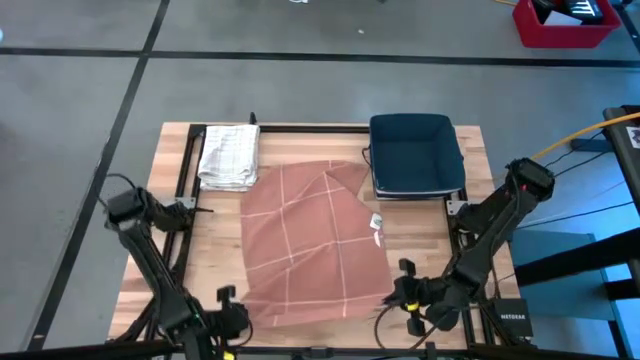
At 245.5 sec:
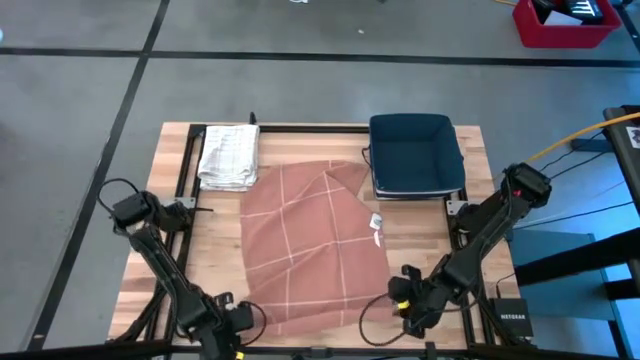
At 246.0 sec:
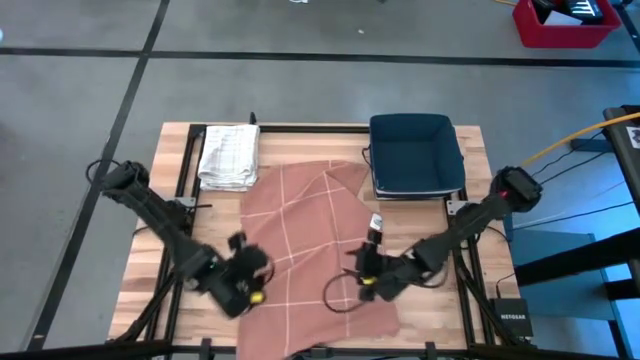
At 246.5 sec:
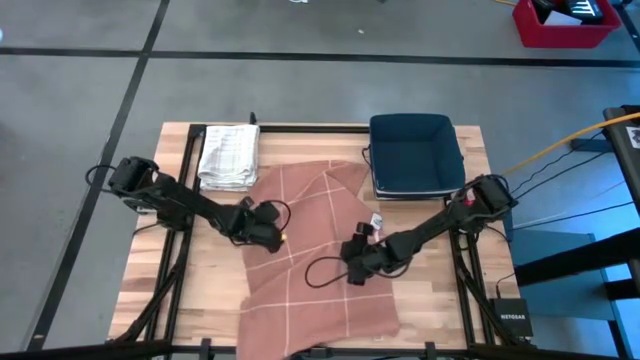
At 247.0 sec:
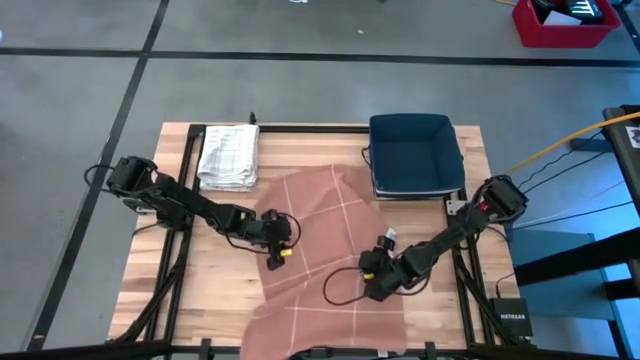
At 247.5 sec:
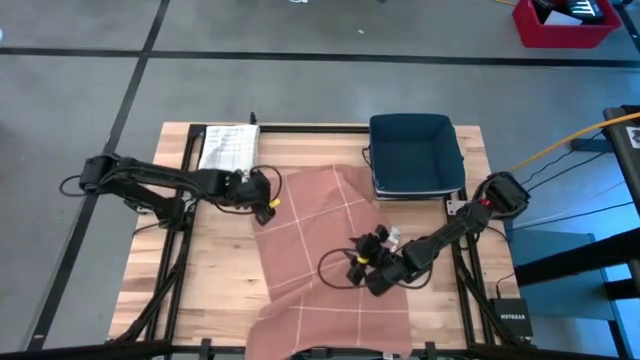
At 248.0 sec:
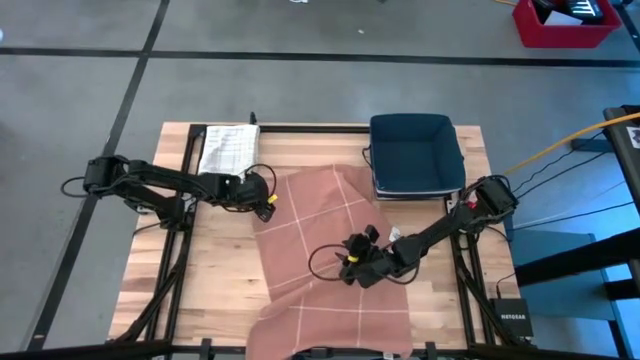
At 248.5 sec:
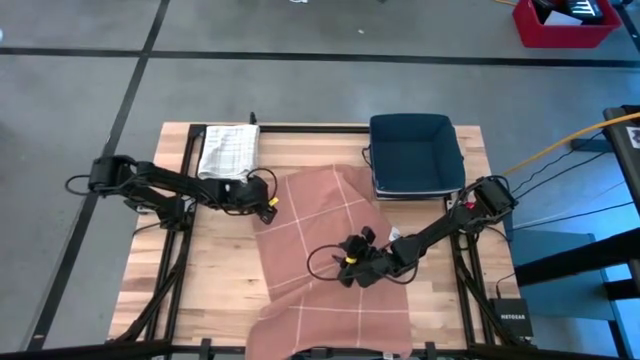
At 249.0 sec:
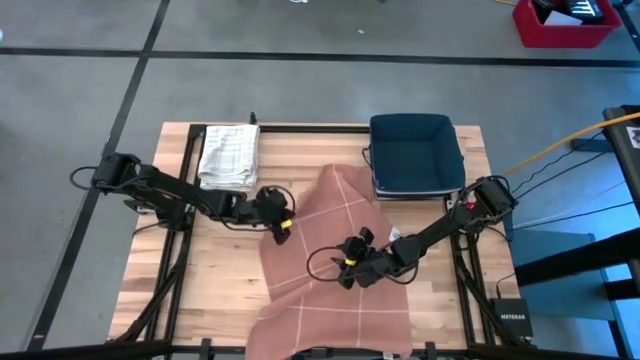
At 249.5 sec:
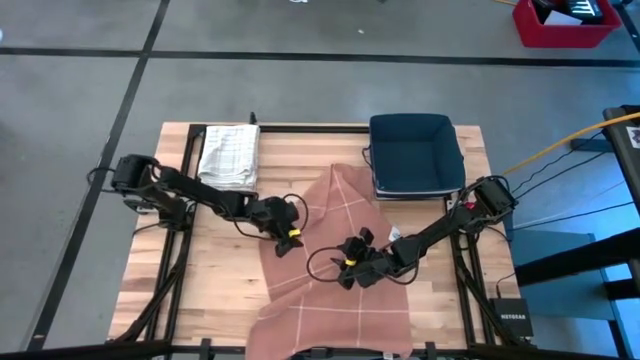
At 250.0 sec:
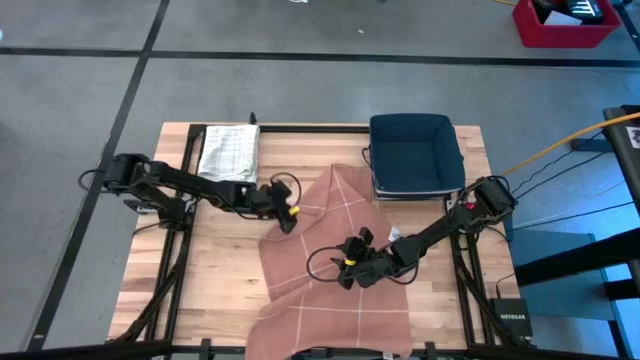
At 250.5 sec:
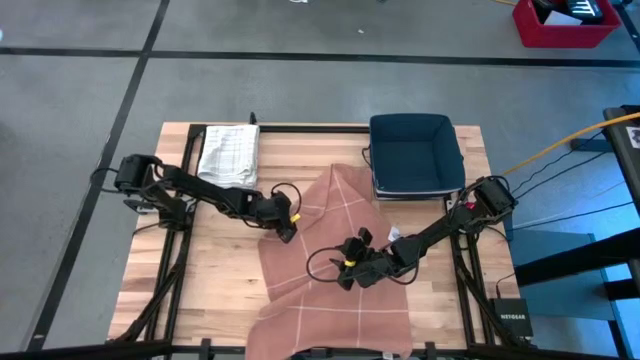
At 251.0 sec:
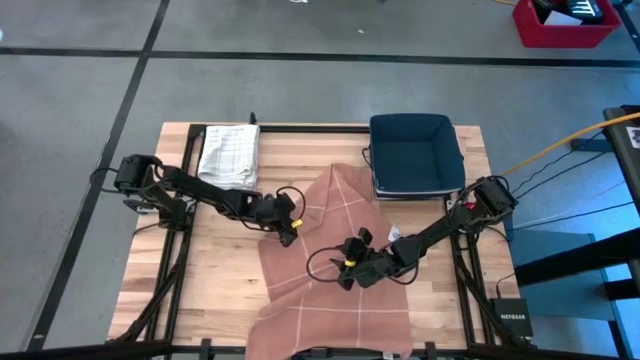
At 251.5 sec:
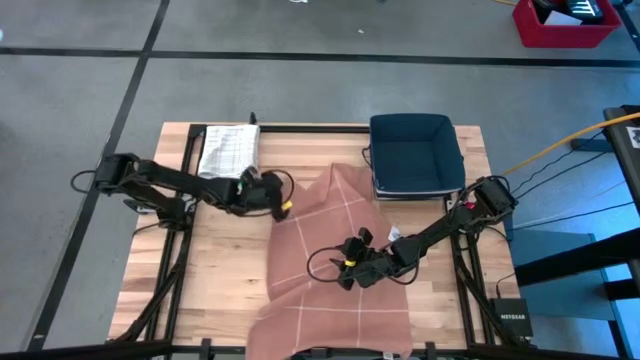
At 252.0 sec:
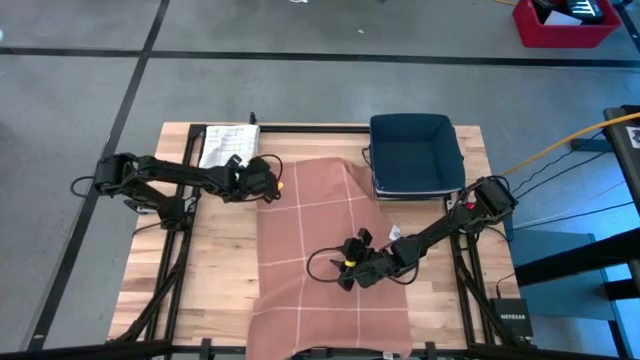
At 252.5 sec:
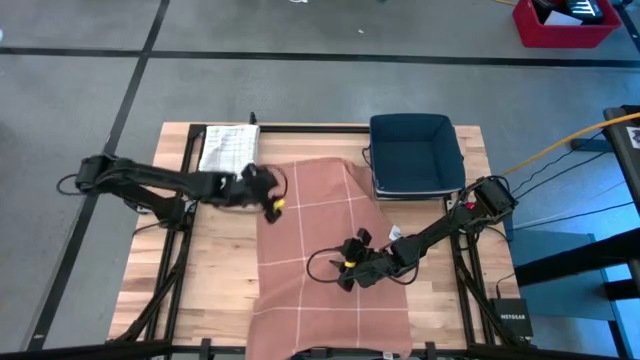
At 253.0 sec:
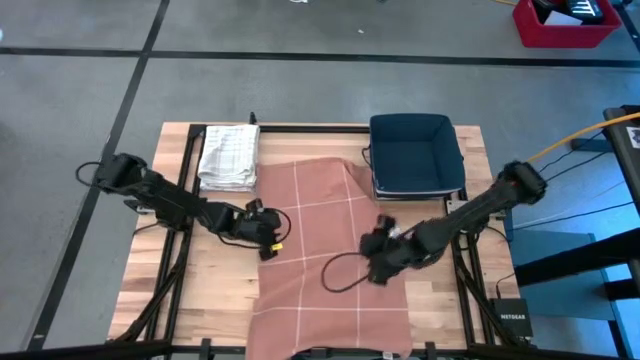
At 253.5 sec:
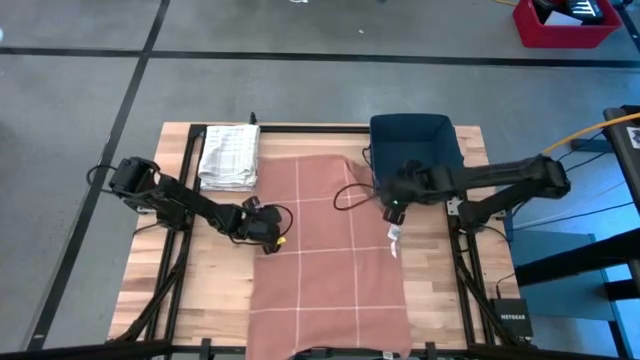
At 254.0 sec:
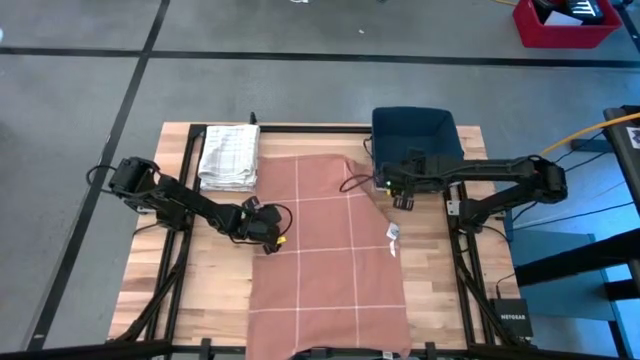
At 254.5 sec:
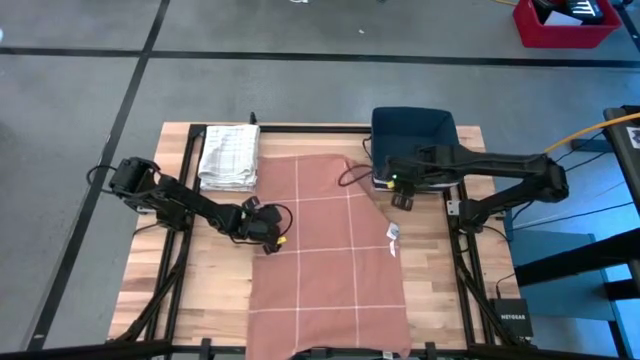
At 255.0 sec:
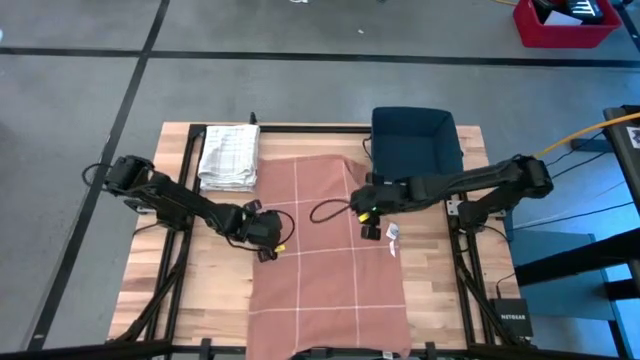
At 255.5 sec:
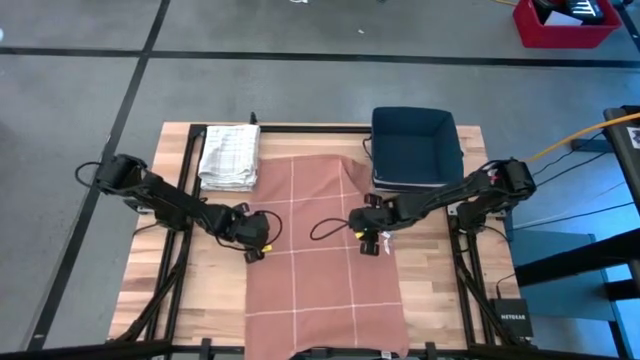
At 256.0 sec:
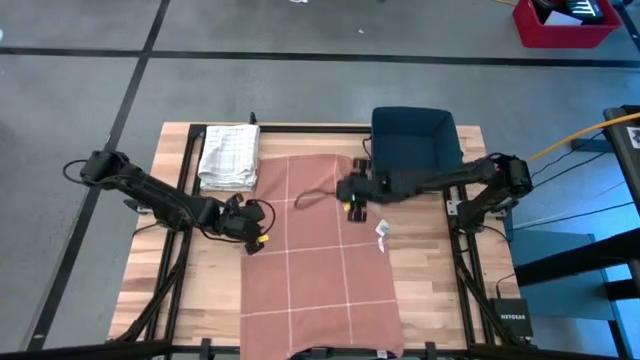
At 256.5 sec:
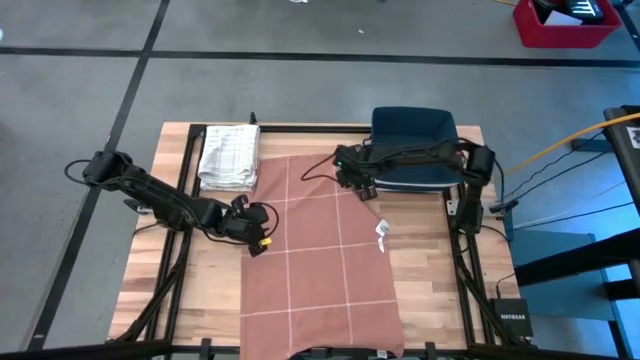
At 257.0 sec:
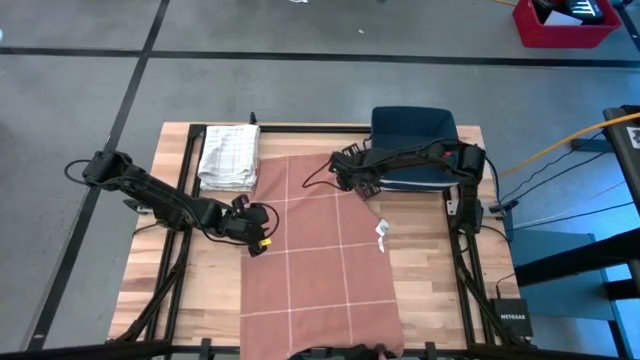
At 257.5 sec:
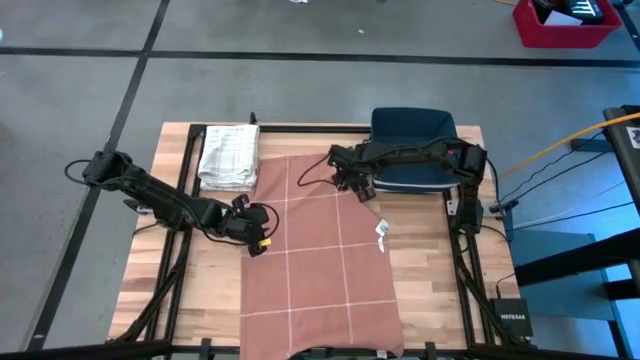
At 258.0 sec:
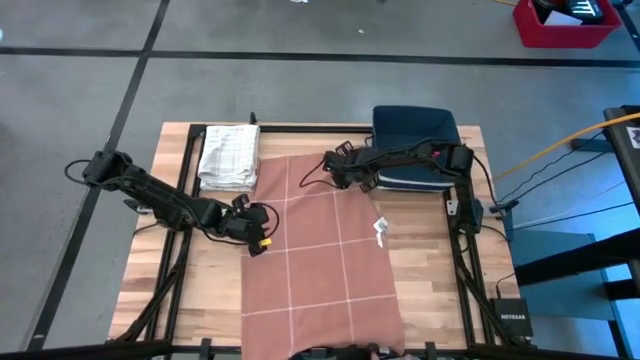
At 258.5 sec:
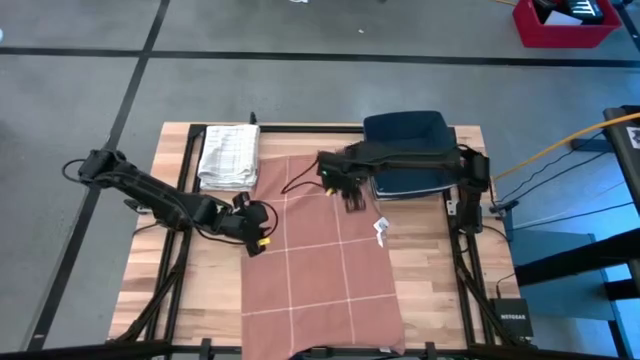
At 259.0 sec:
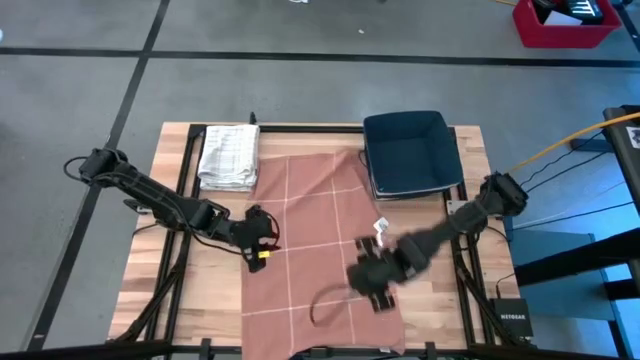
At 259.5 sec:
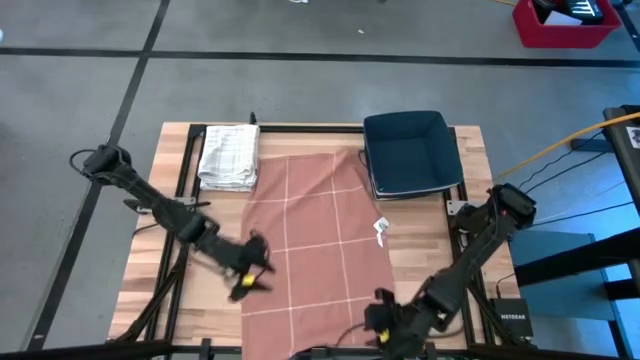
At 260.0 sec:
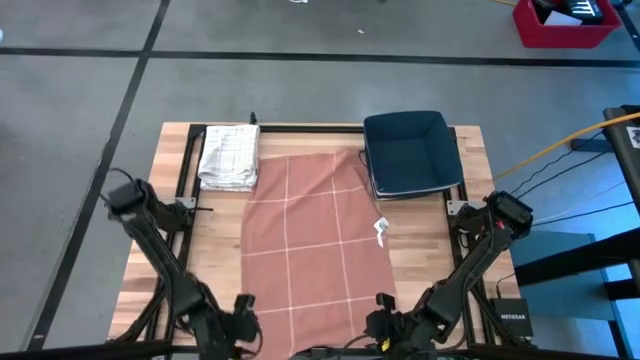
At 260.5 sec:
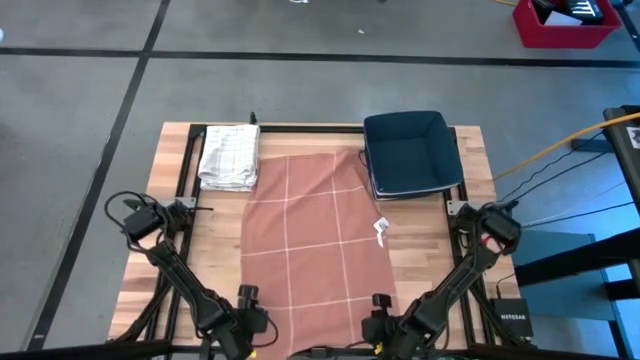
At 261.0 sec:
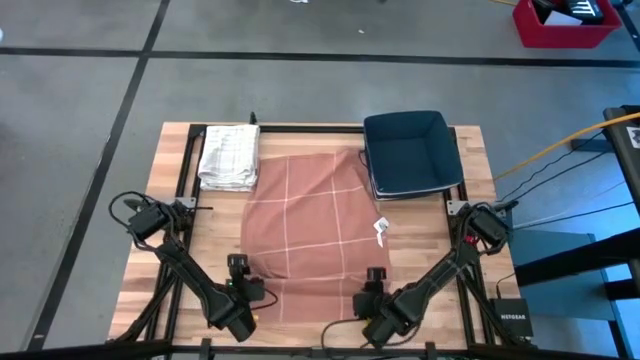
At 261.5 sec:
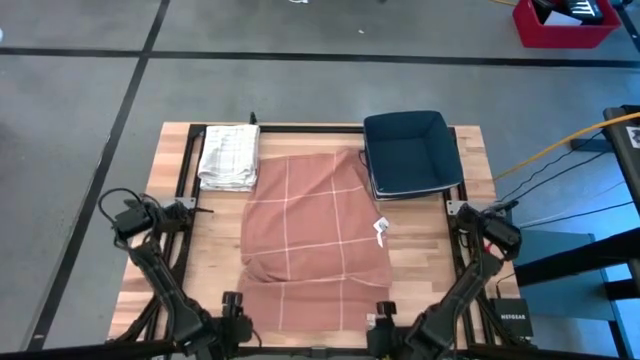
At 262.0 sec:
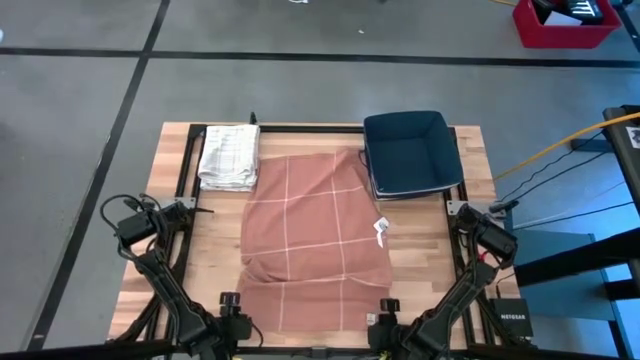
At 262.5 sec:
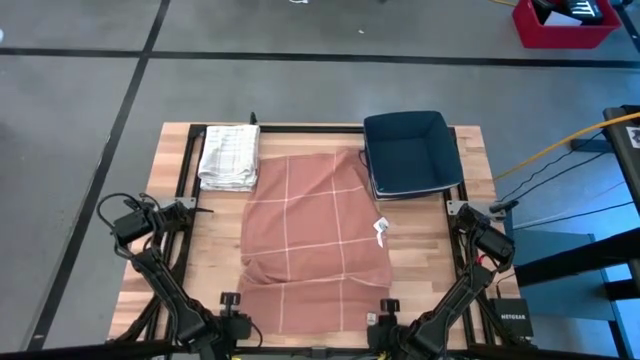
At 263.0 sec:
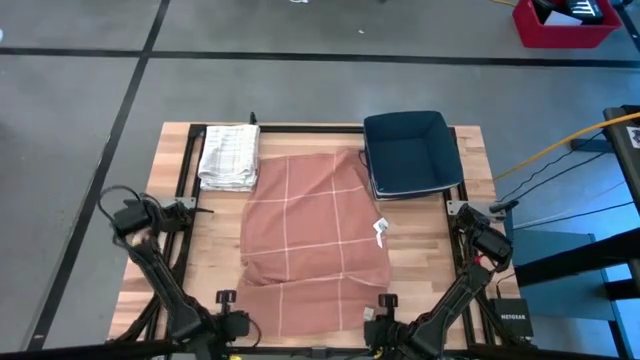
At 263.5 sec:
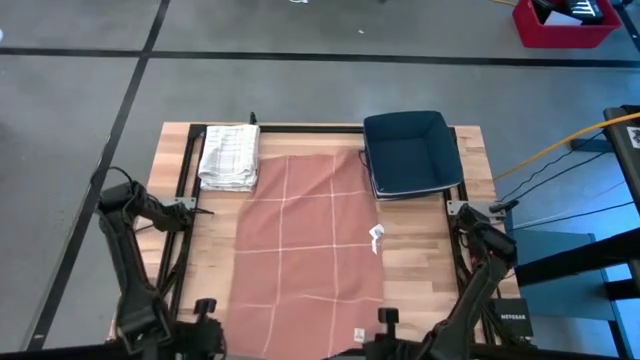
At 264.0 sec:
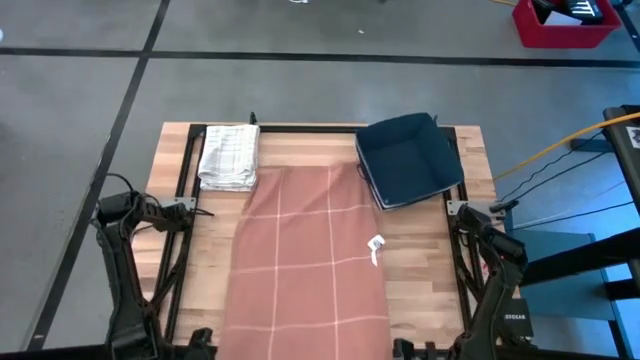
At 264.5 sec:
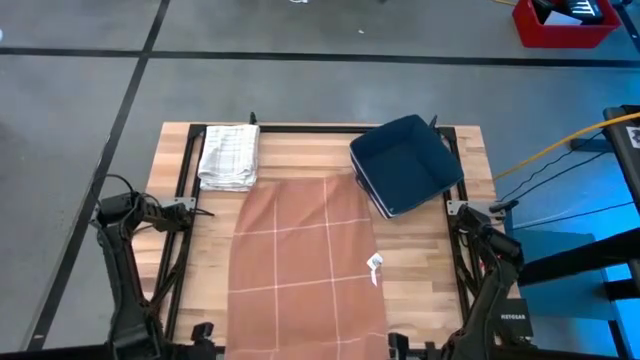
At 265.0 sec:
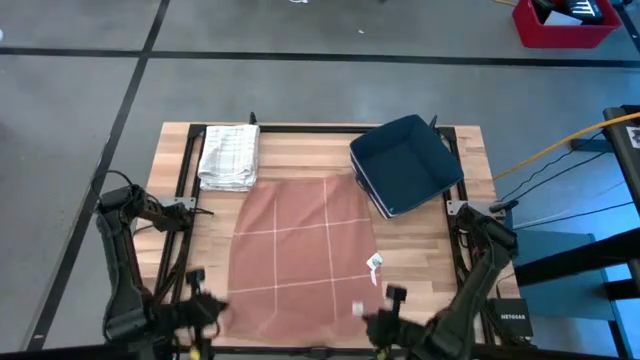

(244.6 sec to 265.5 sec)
Task: Fold towel
Fold the brown towel on the table
